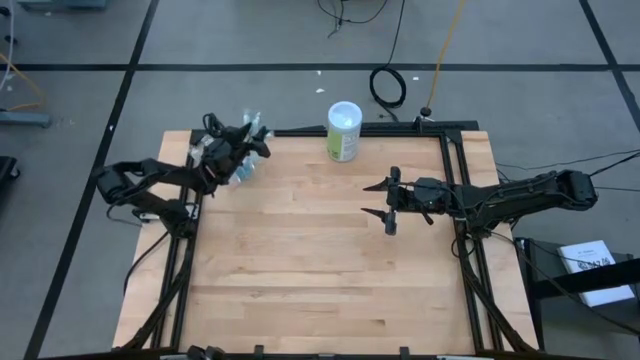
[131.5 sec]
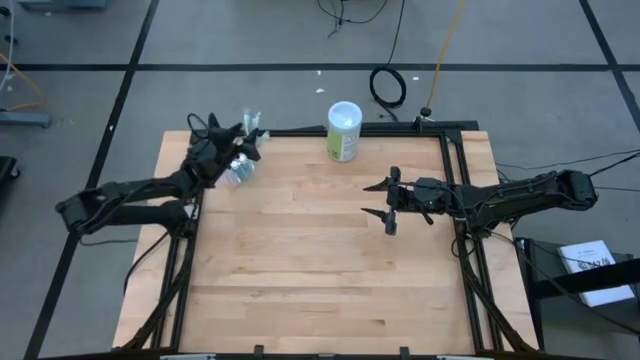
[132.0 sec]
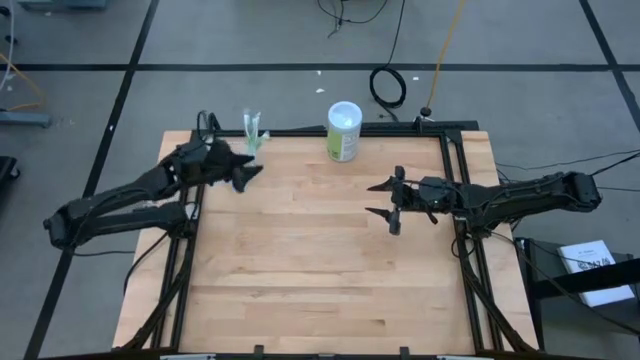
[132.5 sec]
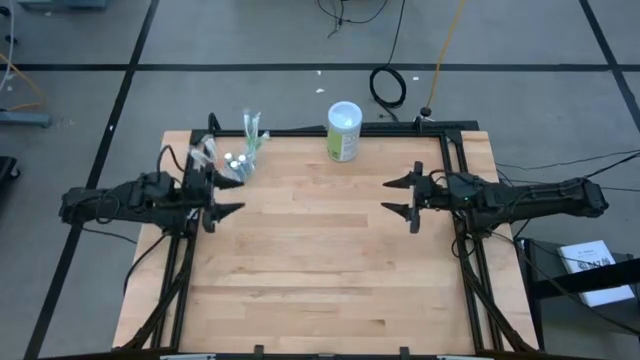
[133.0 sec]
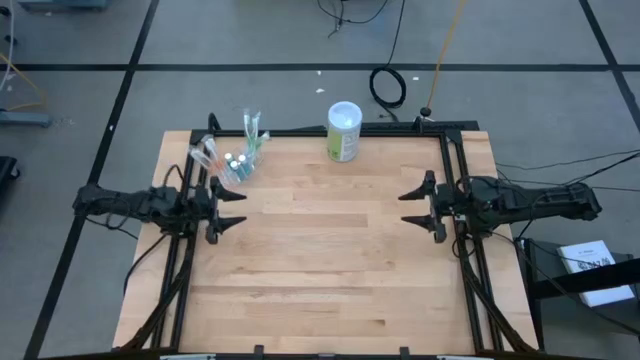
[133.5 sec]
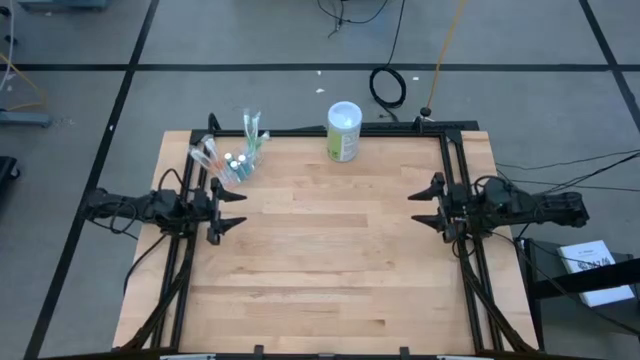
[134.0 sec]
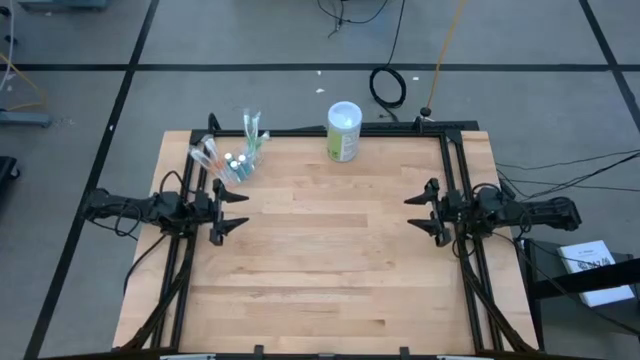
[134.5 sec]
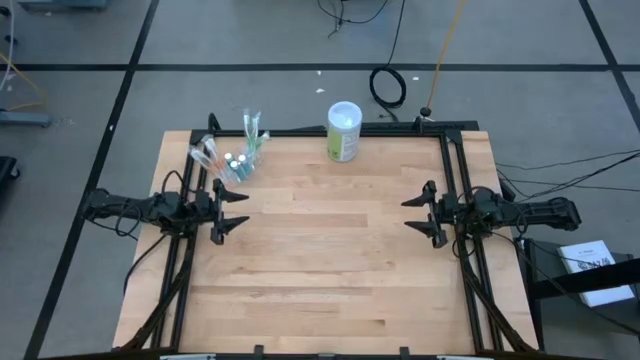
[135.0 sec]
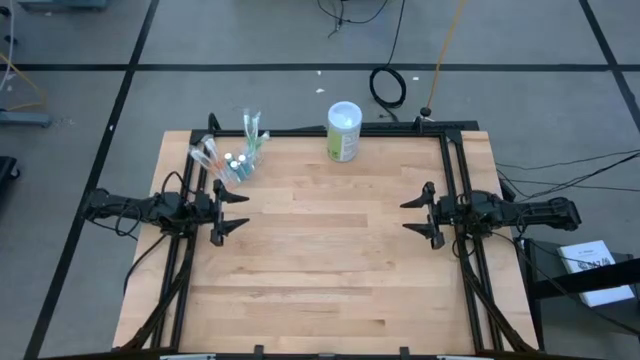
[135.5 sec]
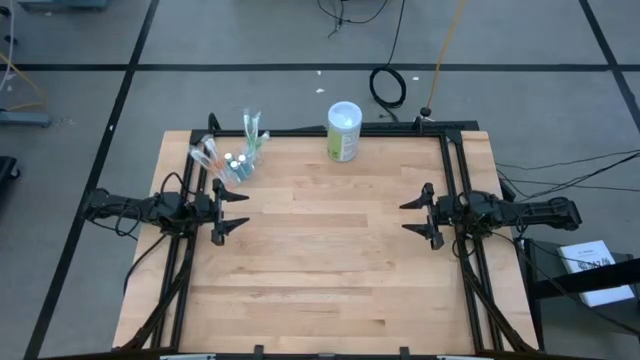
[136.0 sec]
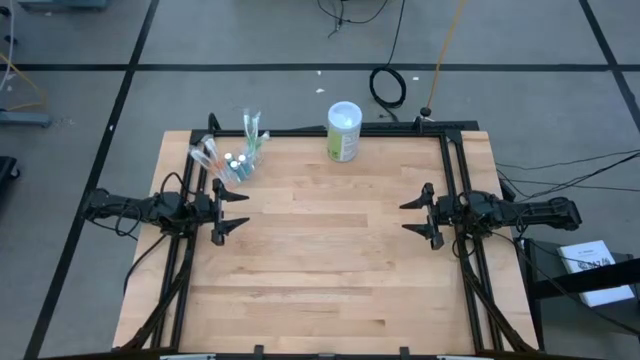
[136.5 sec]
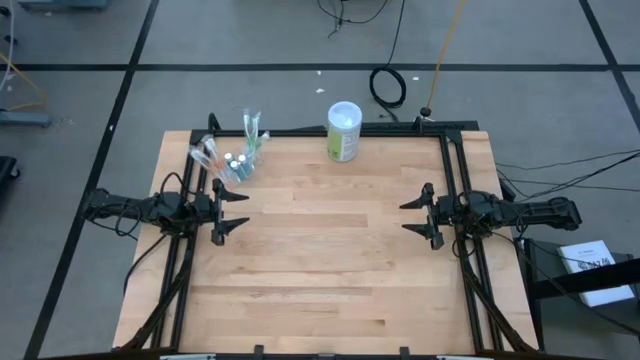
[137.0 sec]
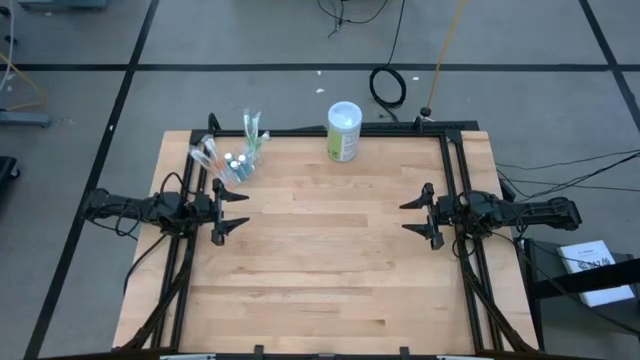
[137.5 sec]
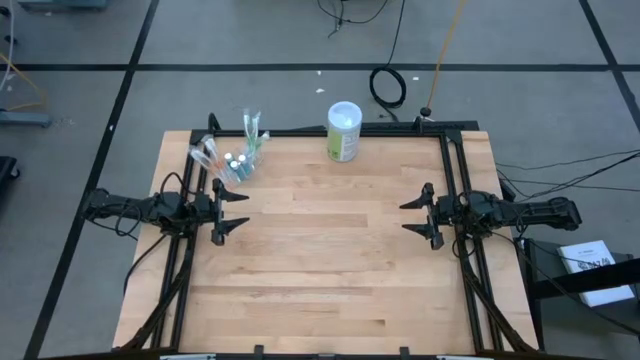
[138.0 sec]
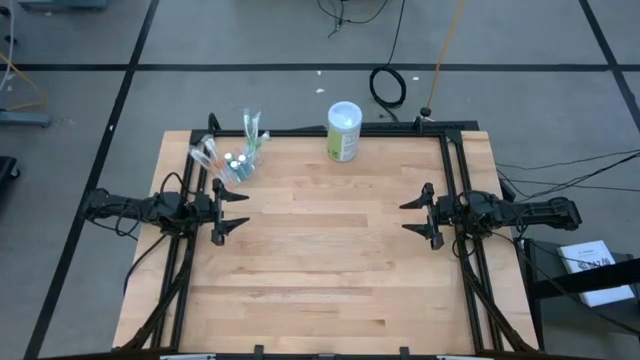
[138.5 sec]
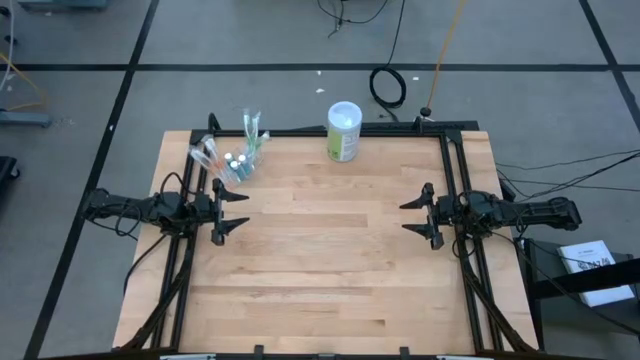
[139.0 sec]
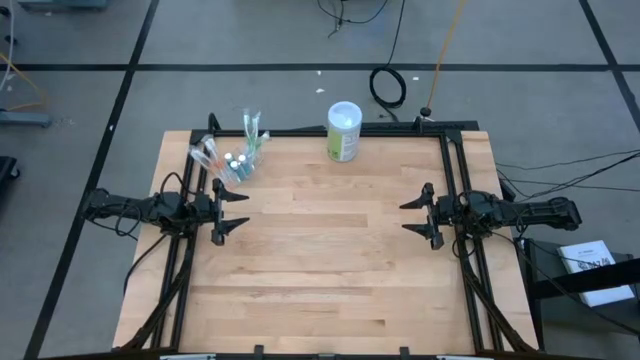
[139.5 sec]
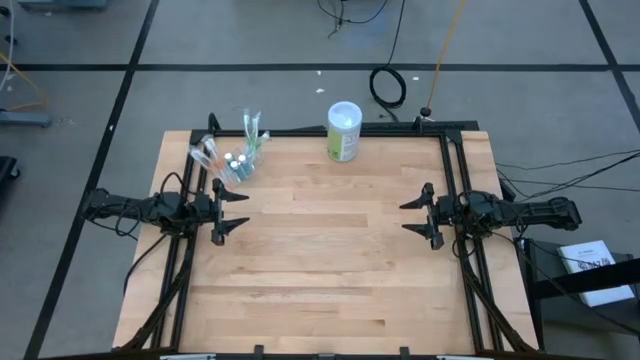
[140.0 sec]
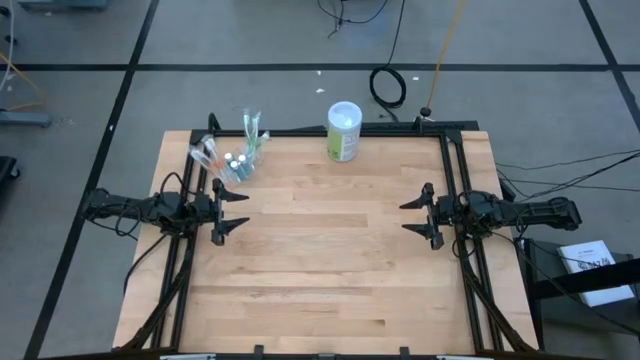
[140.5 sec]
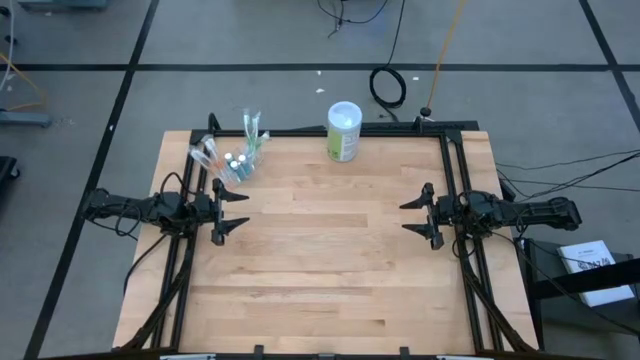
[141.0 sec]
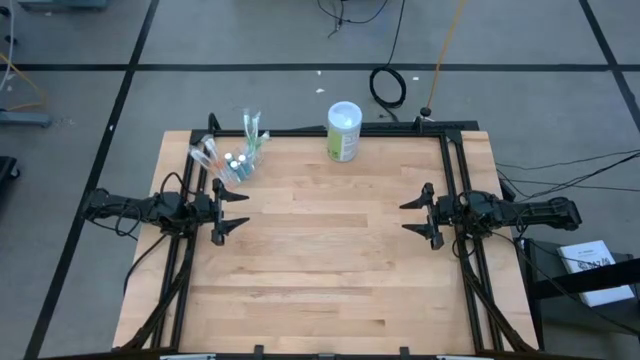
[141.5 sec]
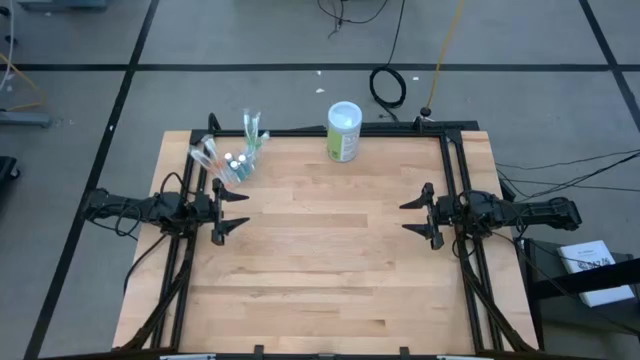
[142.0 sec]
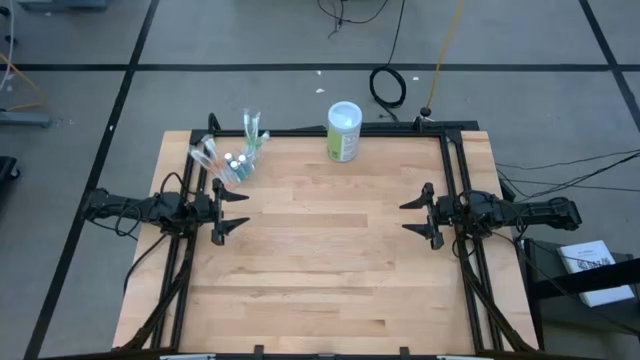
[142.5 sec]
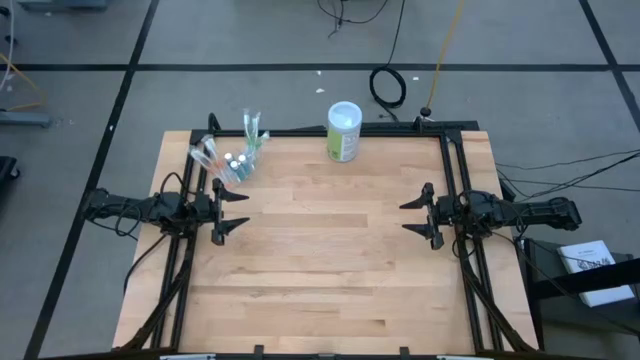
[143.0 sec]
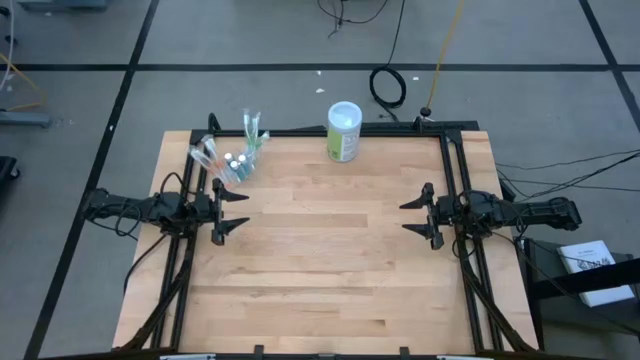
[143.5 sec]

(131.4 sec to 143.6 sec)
Task: Pick & Place toothbrushing station
Return to Home Position

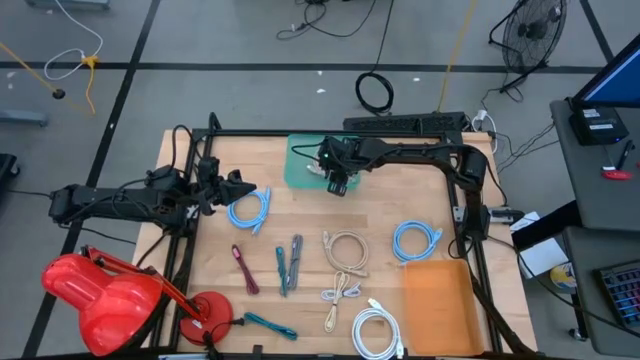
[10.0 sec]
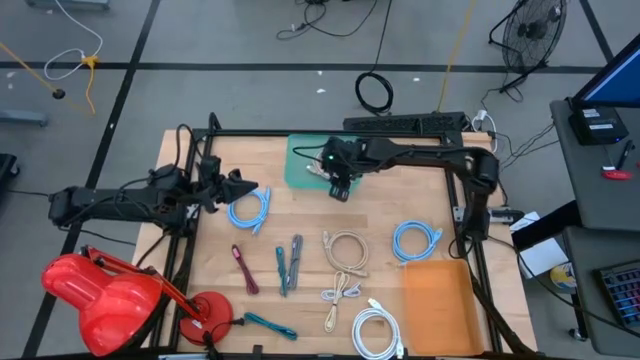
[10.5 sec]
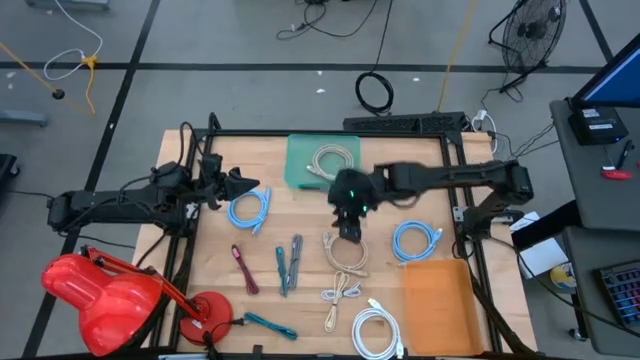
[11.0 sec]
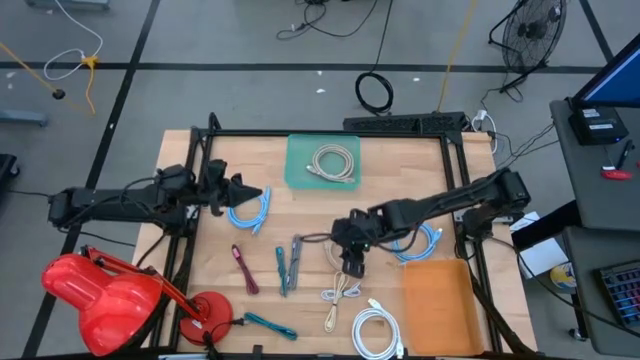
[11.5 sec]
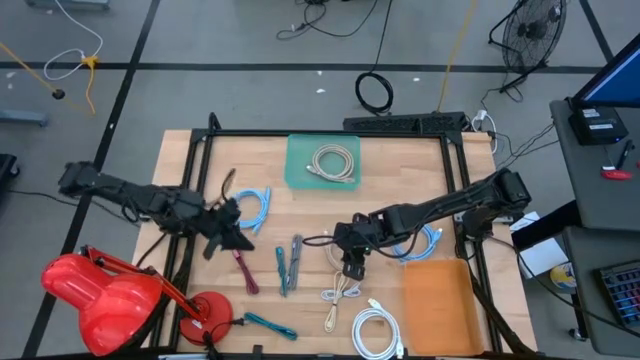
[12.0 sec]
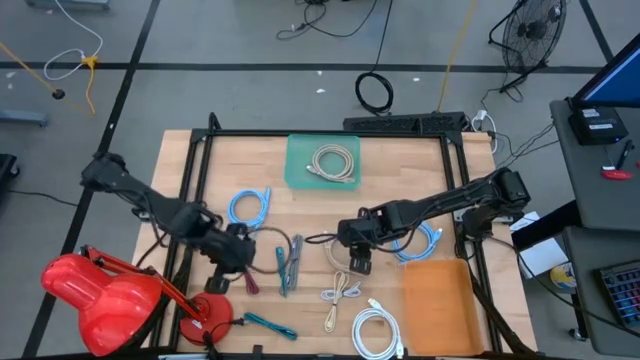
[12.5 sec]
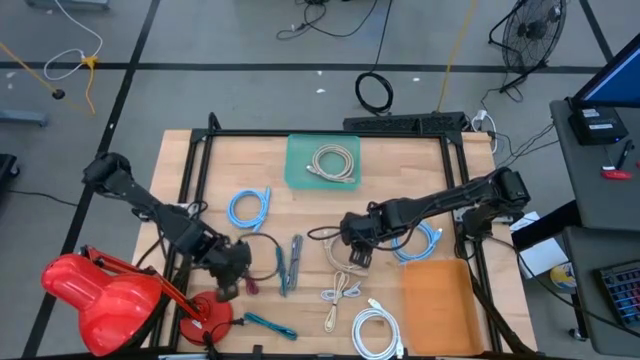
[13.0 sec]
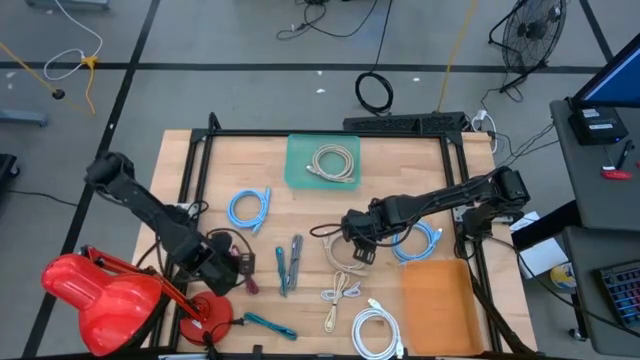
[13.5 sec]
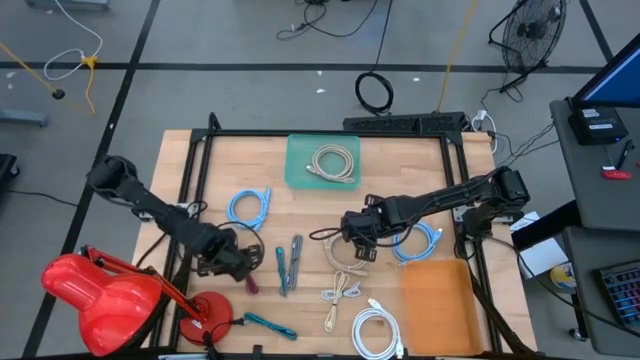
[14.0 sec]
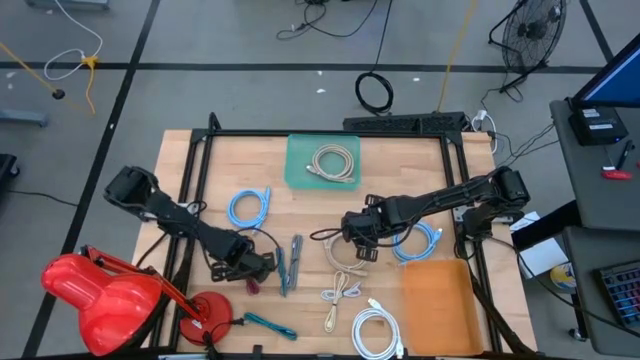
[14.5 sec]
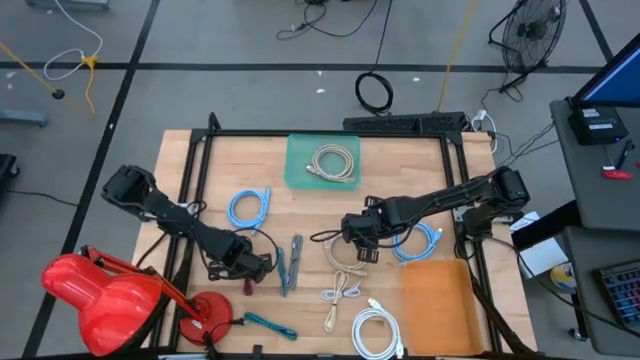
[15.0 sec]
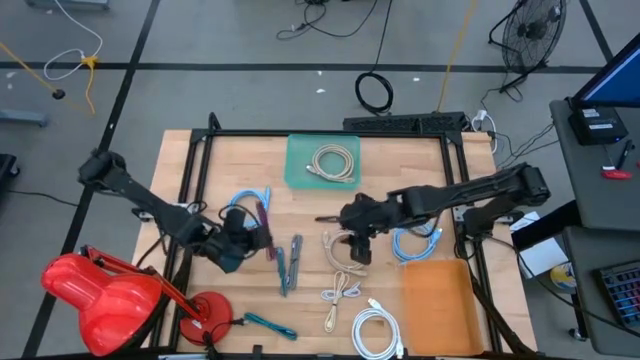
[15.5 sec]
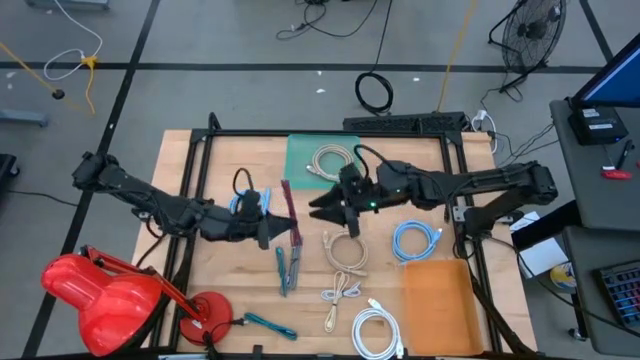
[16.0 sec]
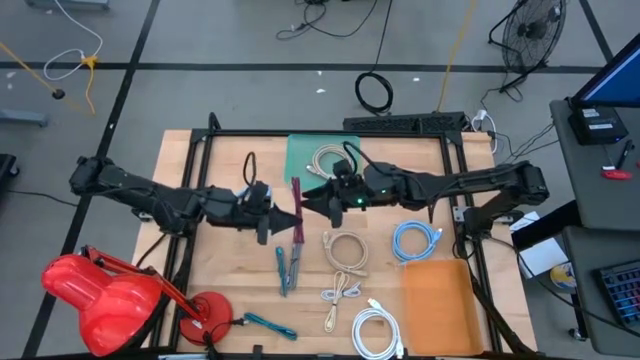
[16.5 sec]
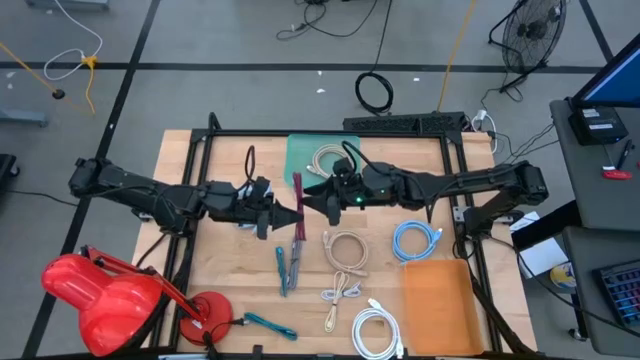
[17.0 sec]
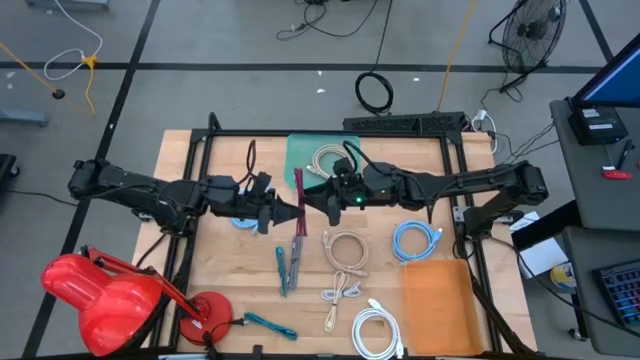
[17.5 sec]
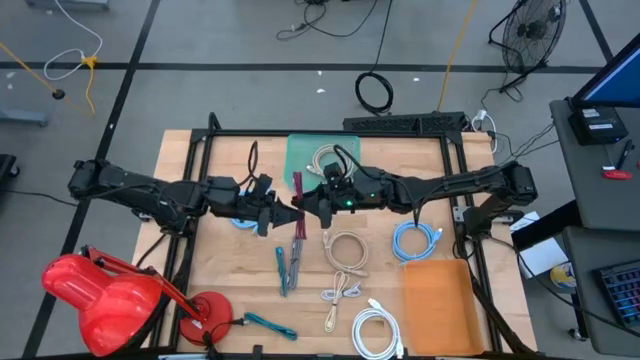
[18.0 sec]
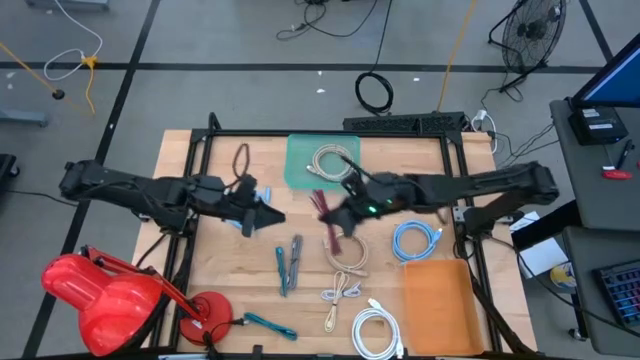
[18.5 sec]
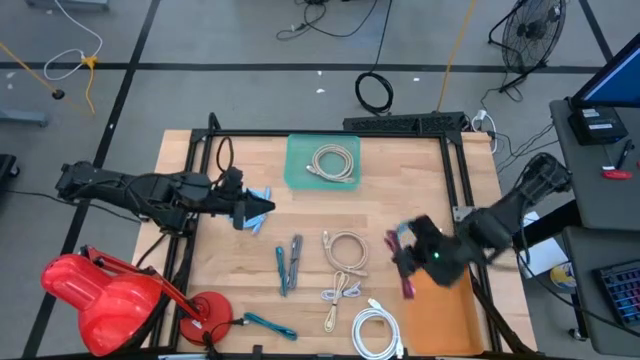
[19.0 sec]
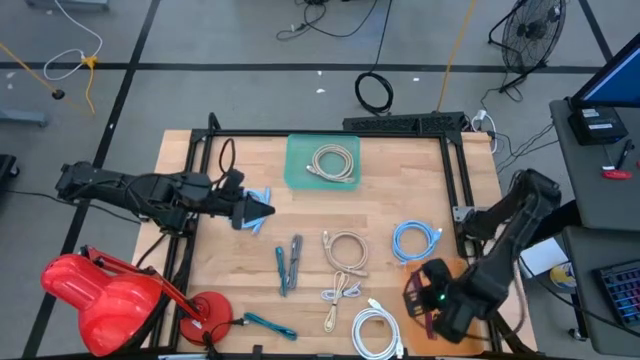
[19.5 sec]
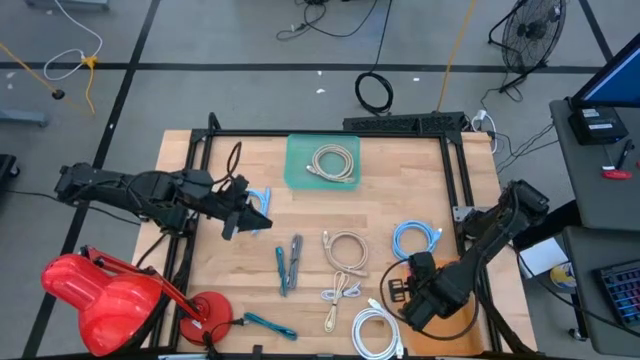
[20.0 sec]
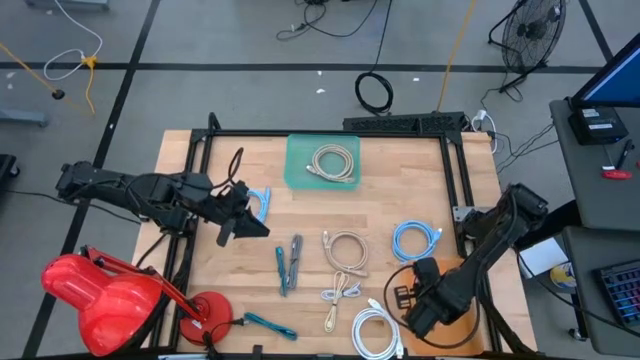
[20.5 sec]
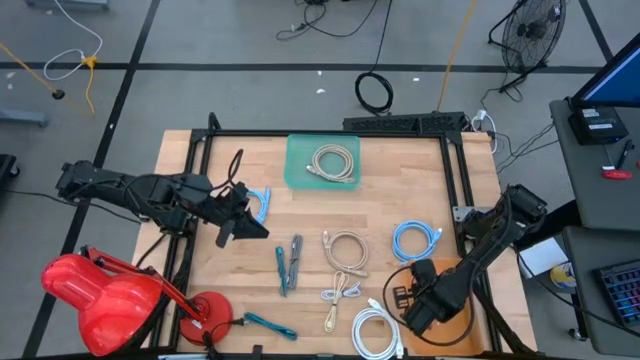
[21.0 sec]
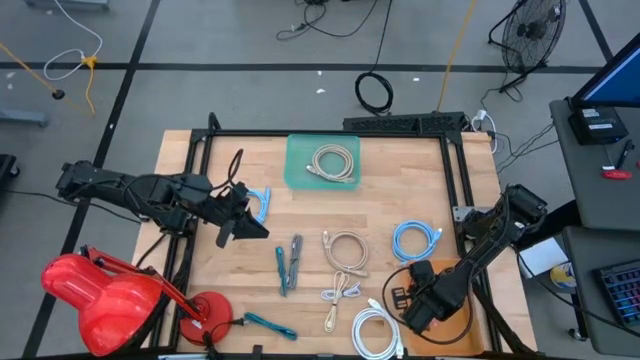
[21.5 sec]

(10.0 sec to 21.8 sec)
Task: Pick & Place USB Port
Put the violet charger cable into the orange bin
